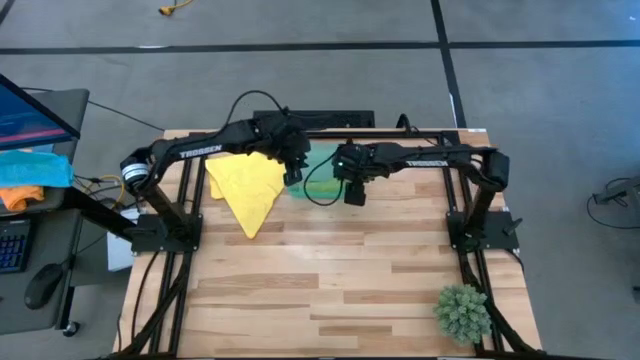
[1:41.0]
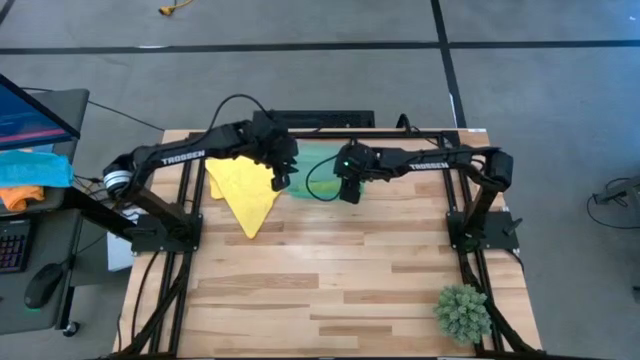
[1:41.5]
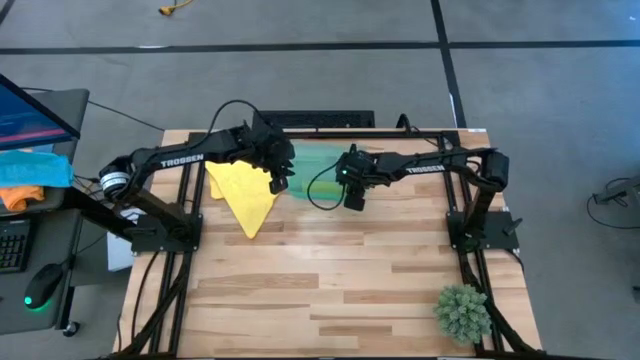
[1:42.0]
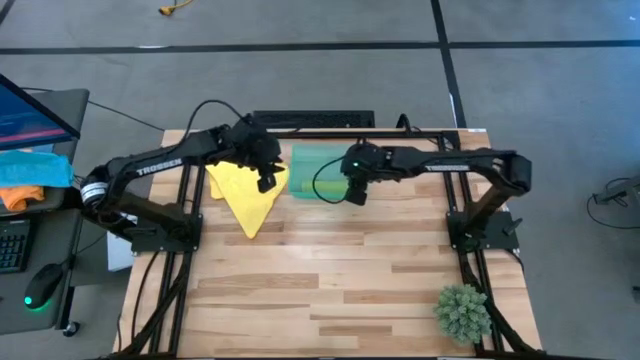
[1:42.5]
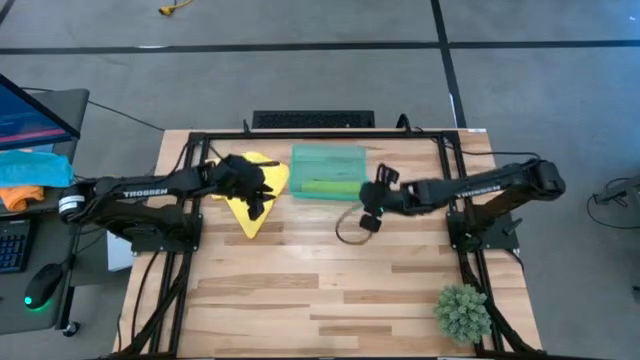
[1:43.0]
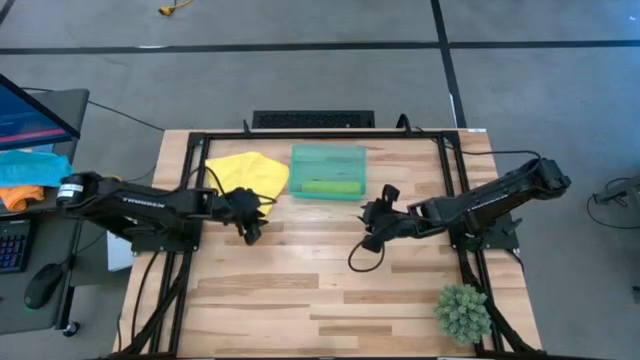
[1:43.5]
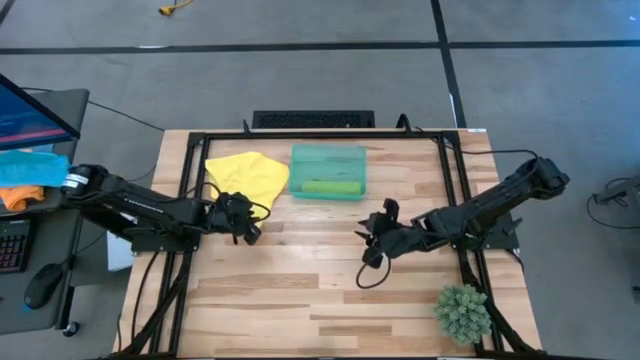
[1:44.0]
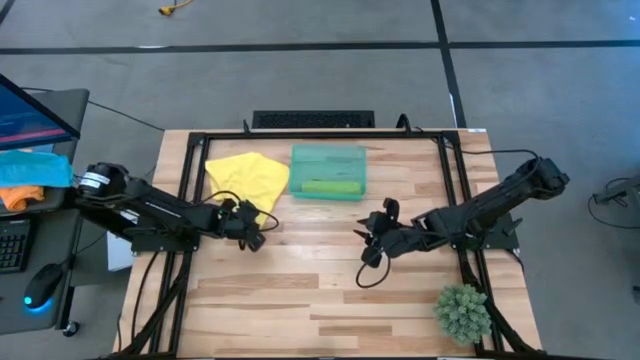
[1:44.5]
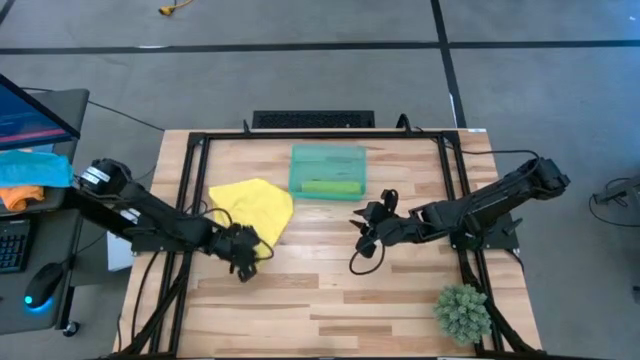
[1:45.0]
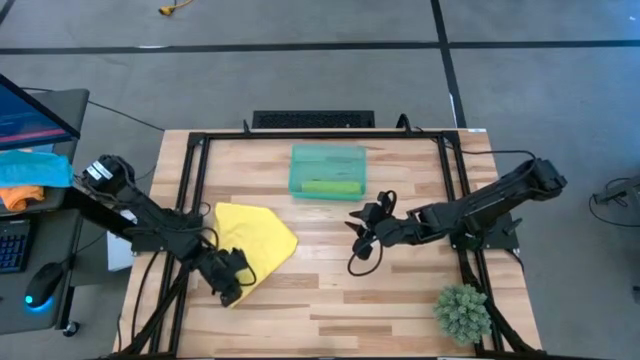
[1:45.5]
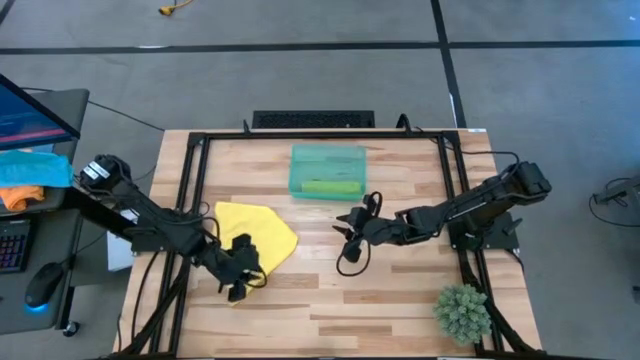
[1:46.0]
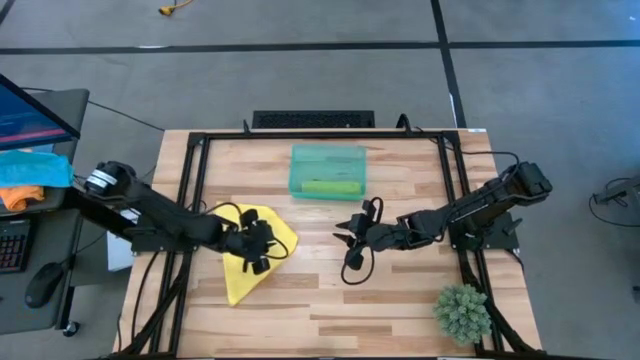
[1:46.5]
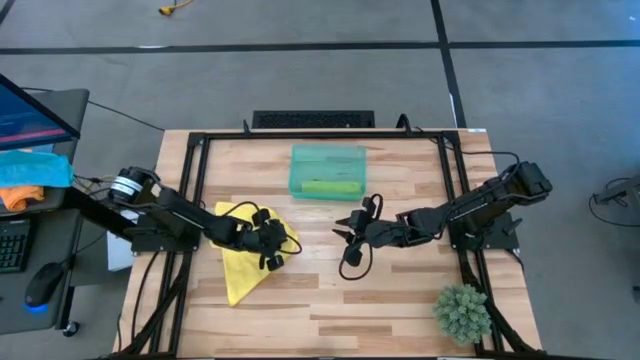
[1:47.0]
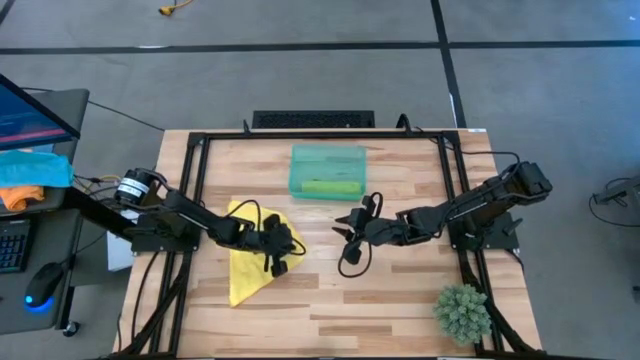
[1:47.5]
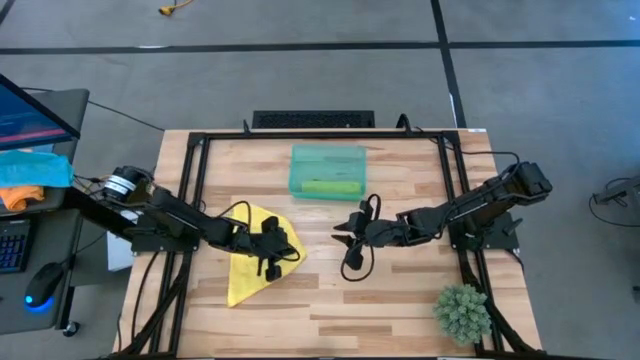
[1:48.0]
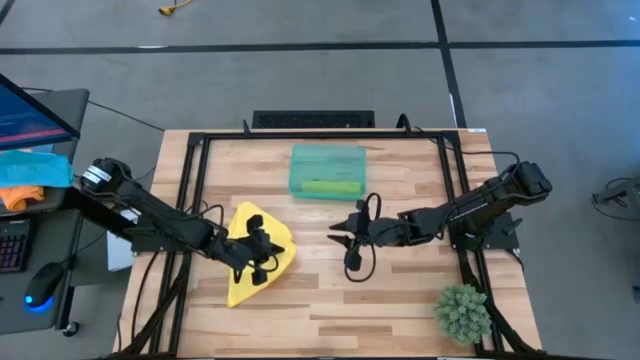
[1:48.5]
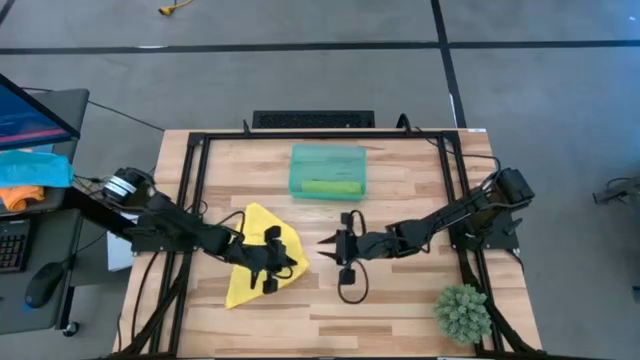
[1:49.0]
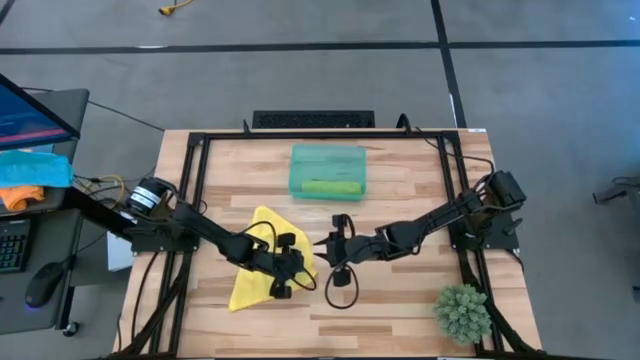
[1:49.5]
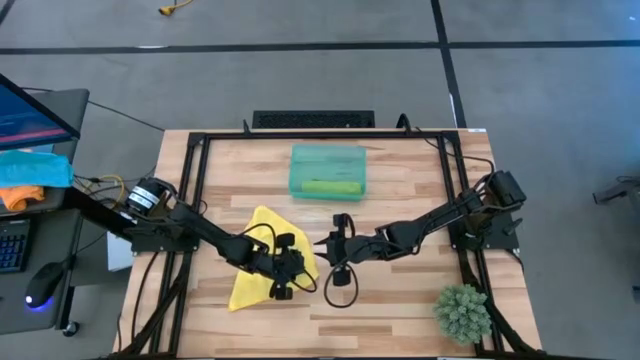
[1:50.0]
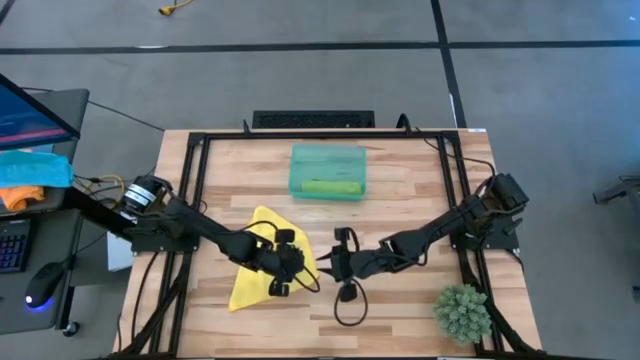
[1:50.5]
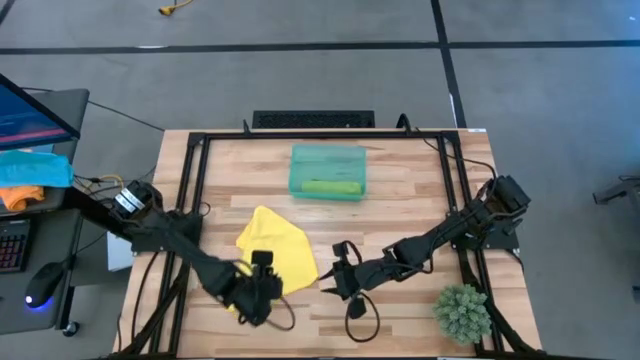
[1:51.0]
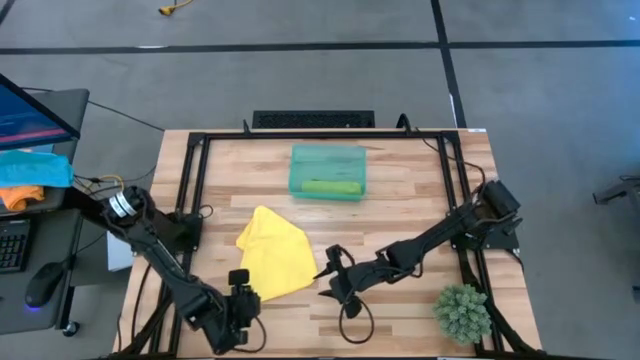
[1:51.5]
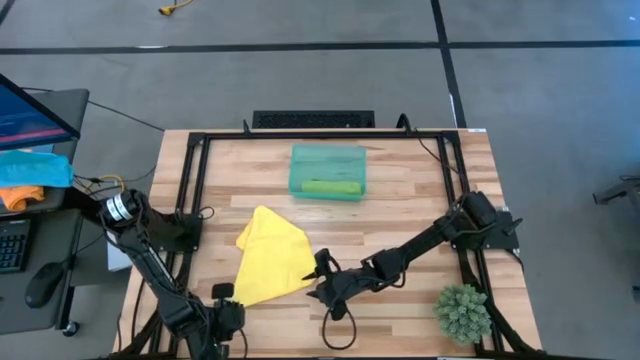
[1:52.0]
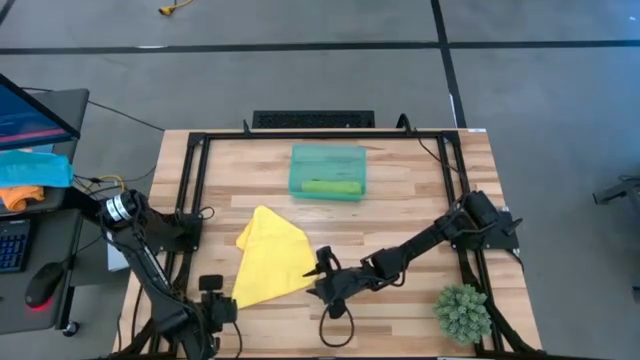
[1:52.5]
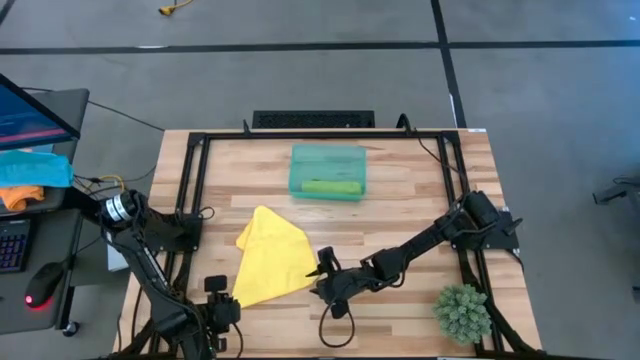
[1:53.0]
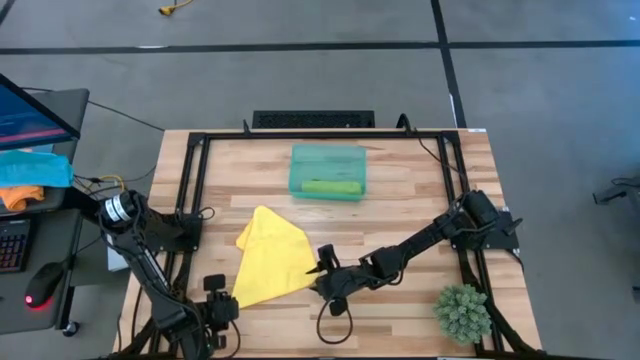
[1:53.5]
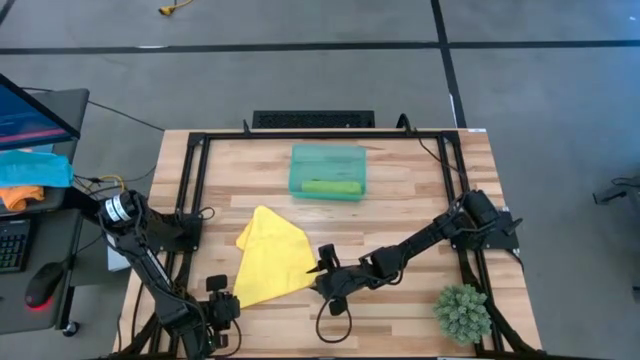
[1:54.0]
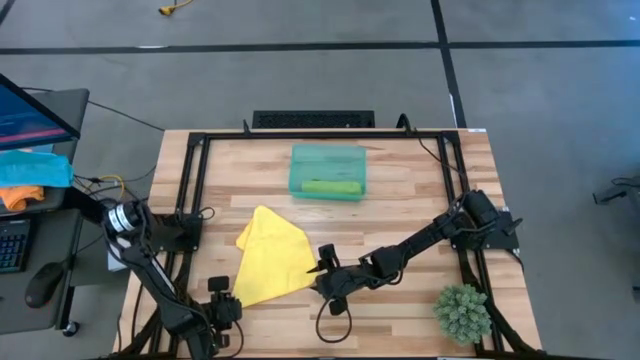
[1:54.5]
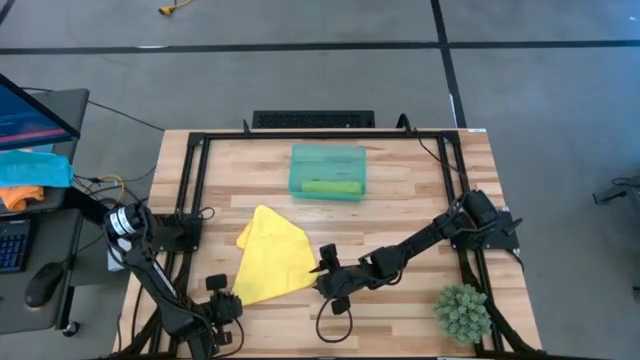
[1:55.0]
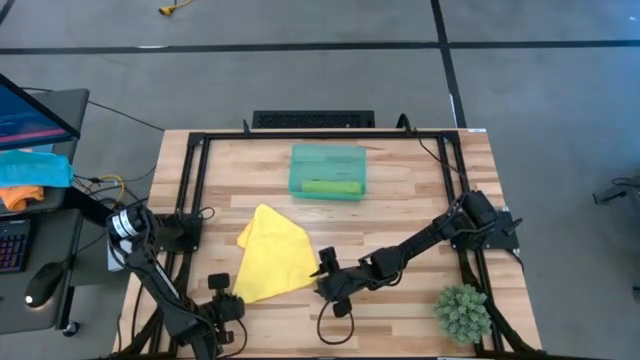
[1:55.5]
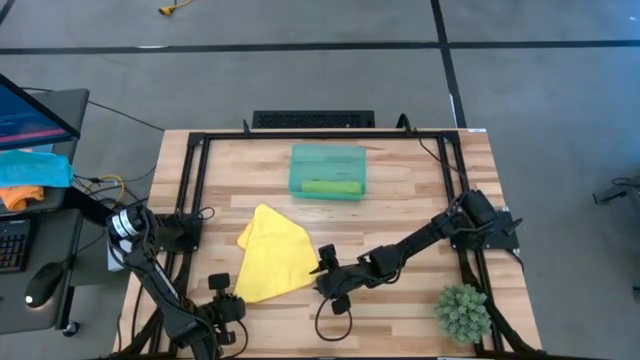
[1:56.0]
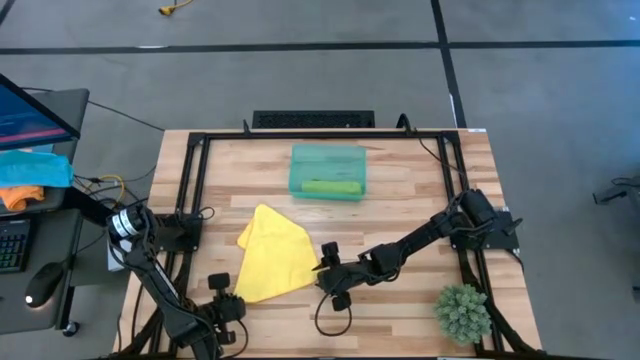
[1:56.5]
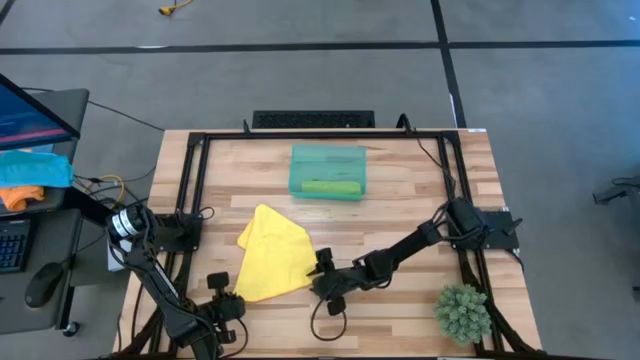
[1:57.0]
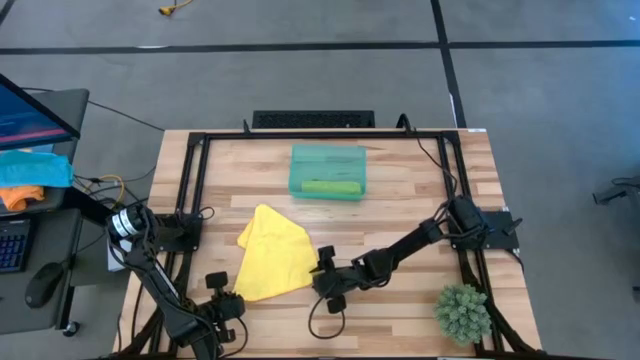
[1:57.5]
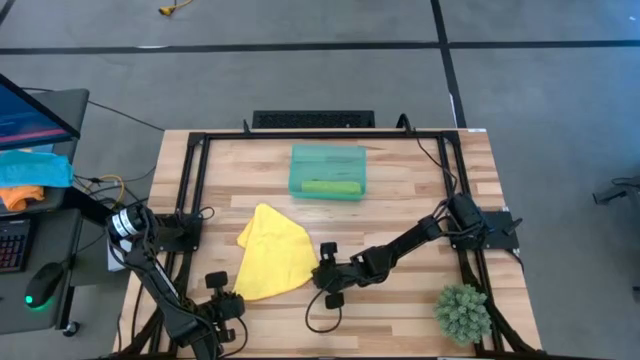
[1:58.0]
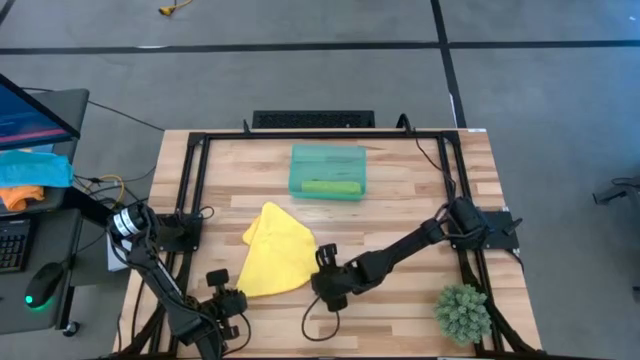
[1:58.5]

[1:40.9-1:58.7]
Task: Roll microfiber towels into tight, uniform cylinder then place into a basket
Fold the yellow microfiber towel

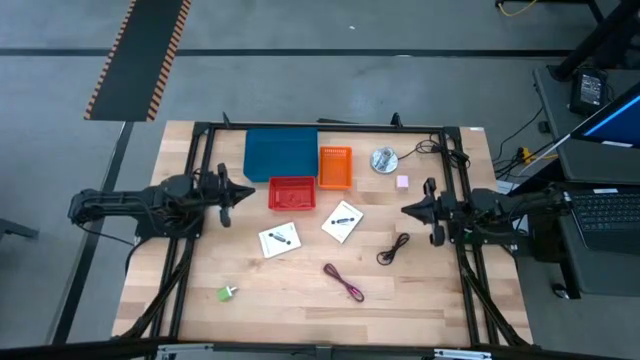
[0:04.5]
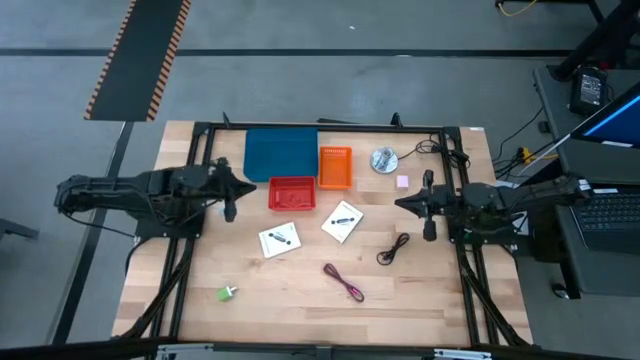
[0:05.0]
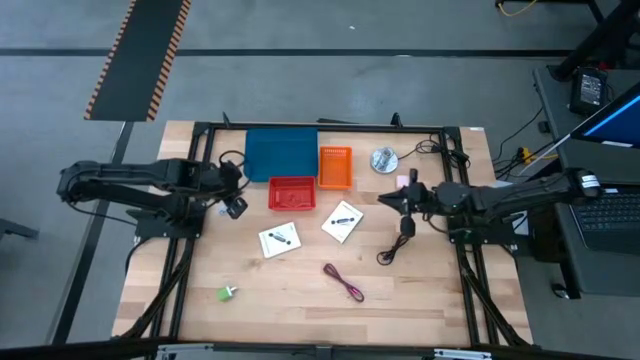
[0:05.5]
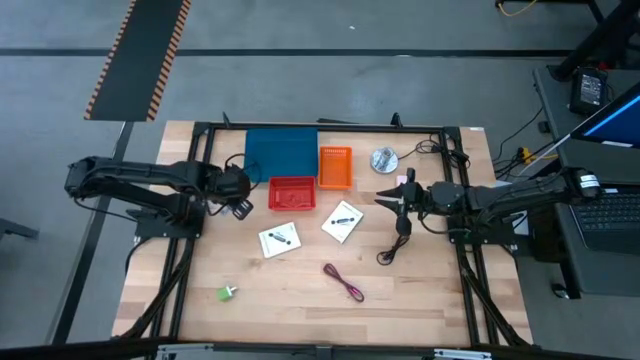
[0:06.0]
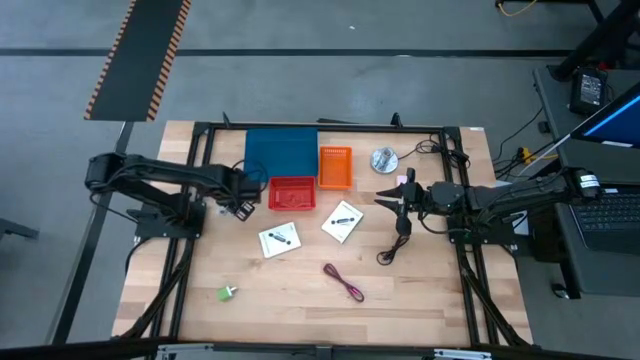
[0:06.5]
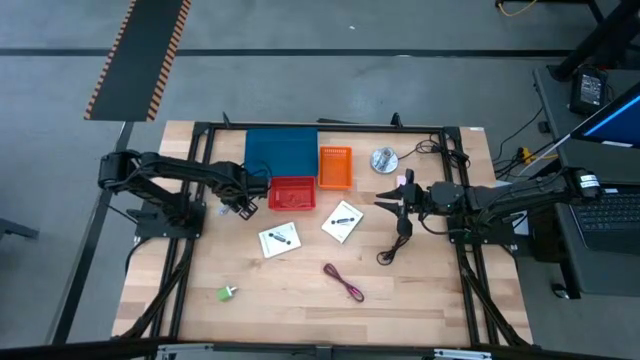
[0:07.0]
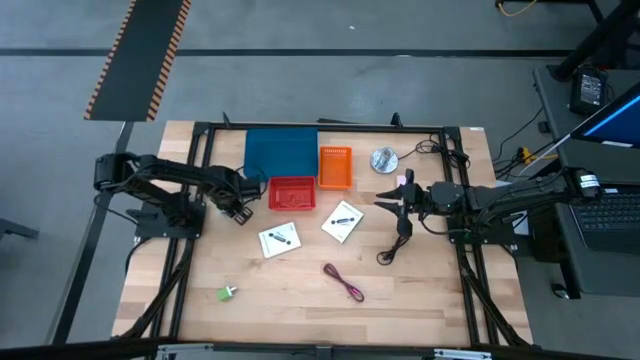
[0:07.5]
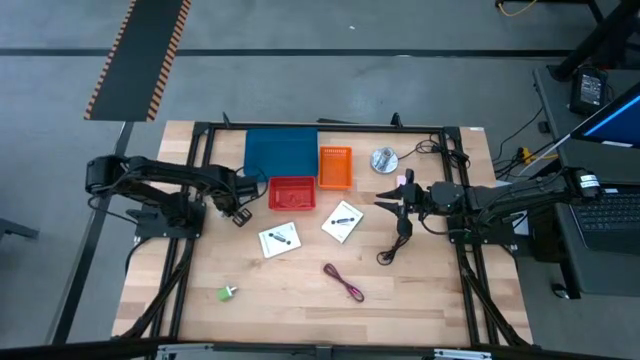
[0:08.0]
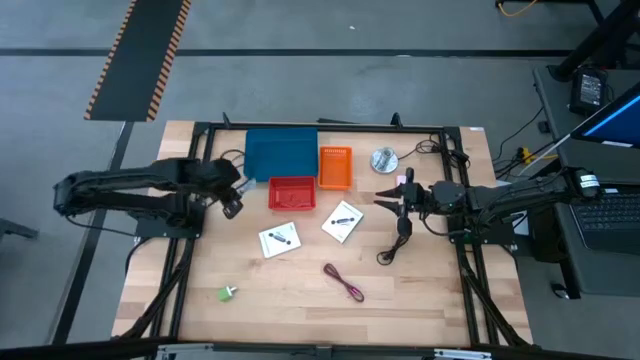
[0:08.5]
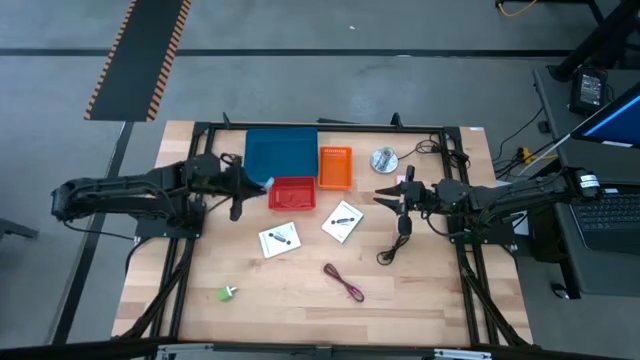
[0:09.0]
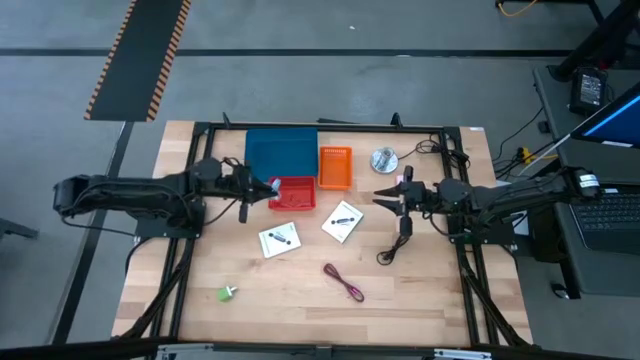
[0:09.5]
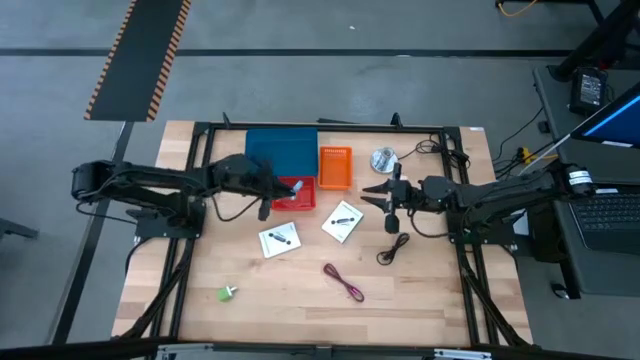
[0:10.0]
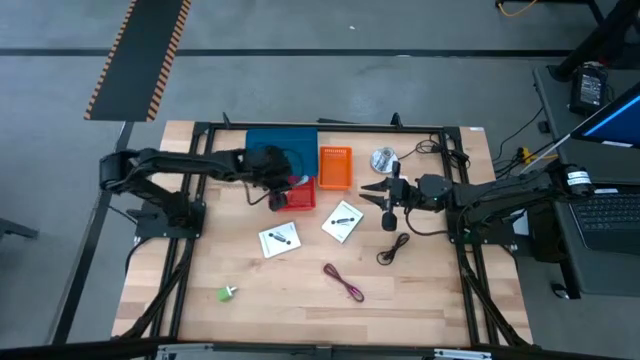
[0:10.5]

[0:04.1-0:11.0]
Task: Pick and place items into bin
Put the blue charger cable into the red bin
